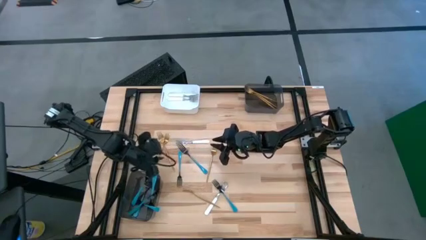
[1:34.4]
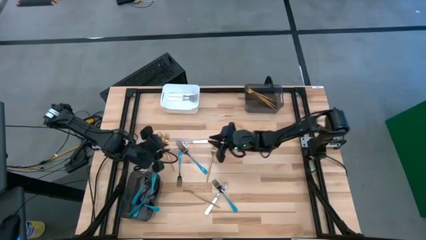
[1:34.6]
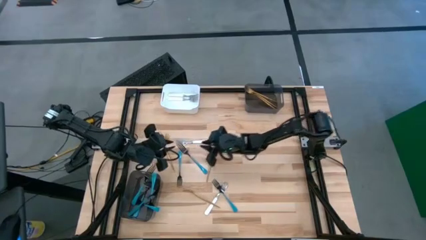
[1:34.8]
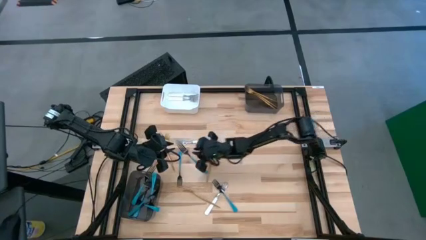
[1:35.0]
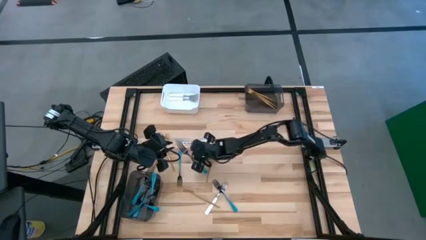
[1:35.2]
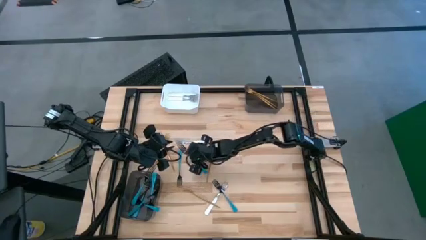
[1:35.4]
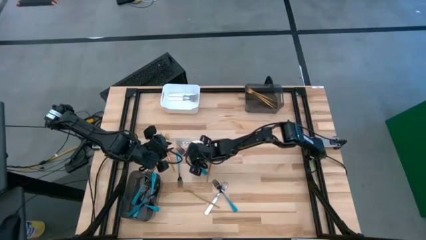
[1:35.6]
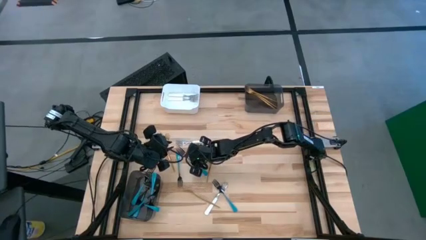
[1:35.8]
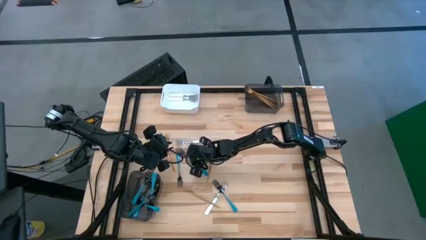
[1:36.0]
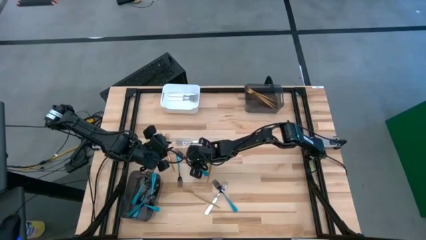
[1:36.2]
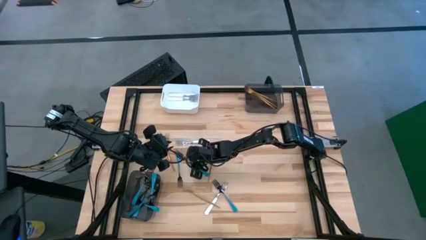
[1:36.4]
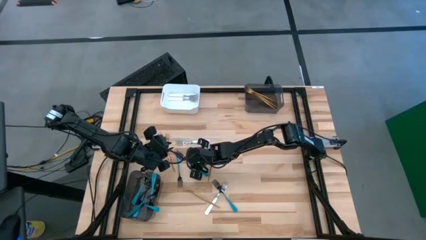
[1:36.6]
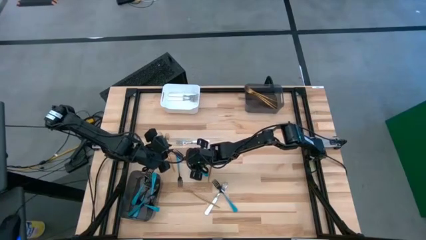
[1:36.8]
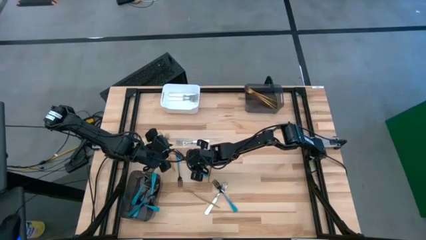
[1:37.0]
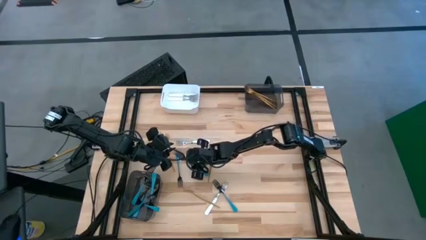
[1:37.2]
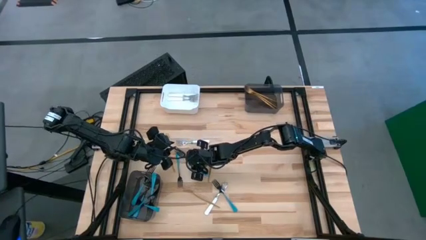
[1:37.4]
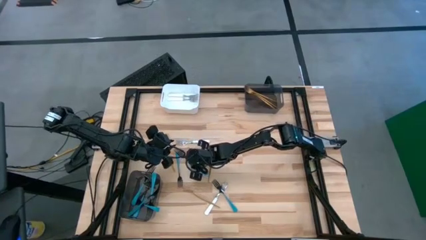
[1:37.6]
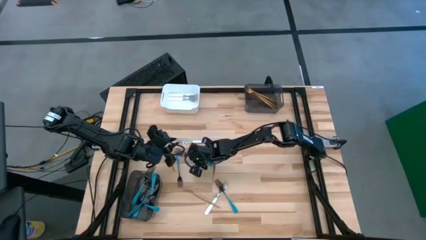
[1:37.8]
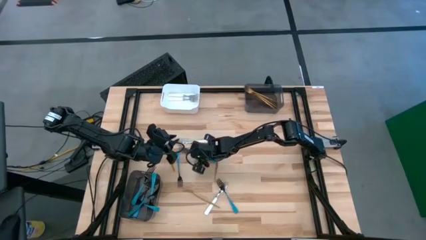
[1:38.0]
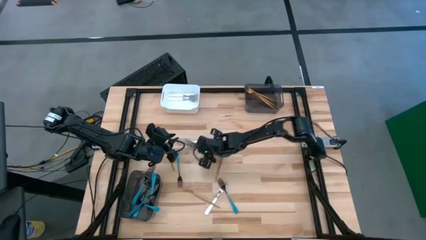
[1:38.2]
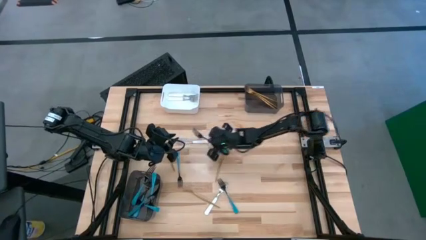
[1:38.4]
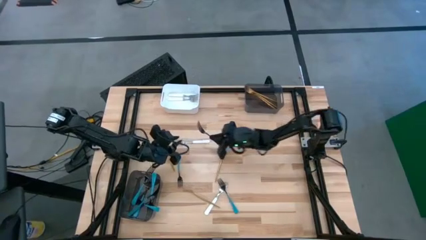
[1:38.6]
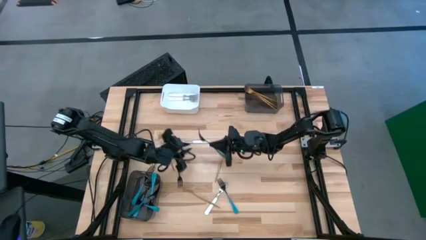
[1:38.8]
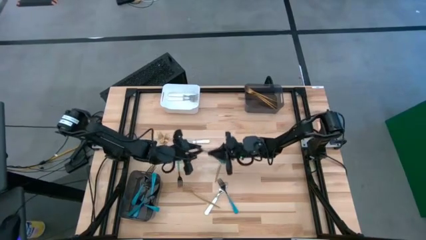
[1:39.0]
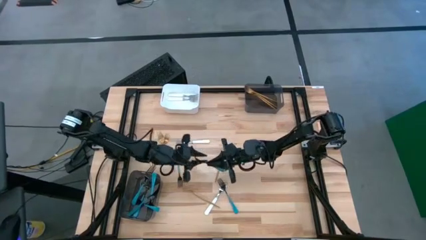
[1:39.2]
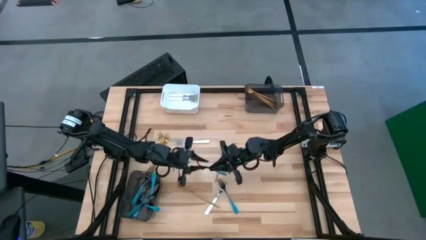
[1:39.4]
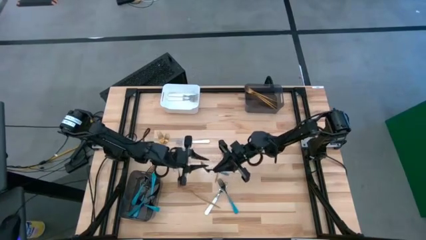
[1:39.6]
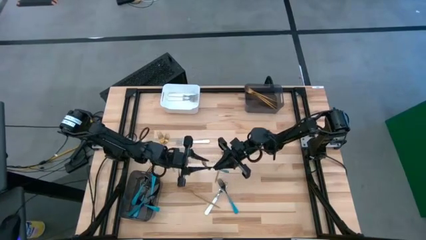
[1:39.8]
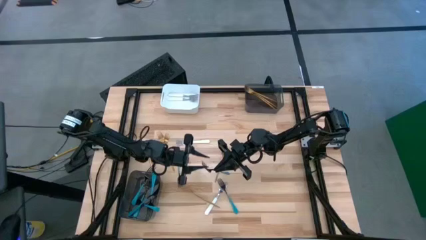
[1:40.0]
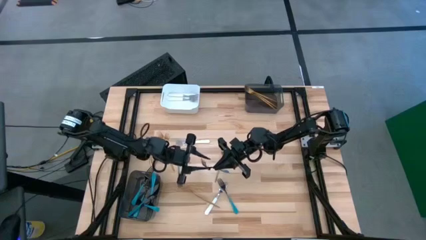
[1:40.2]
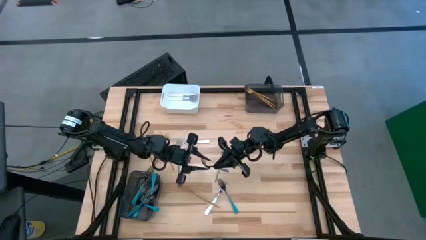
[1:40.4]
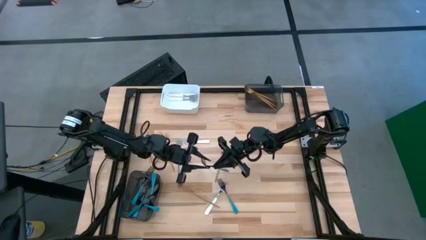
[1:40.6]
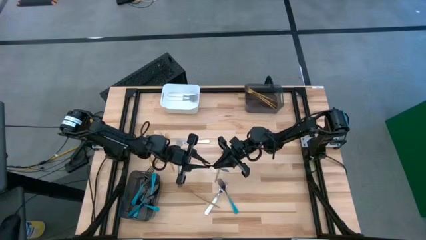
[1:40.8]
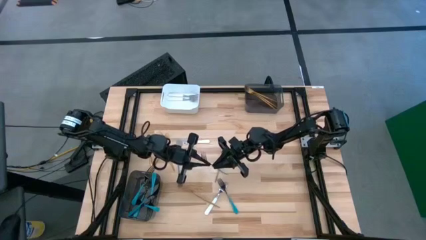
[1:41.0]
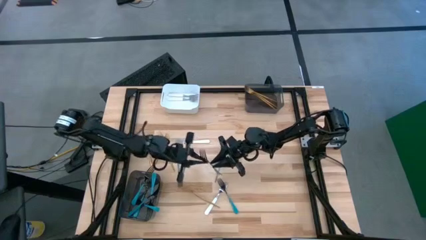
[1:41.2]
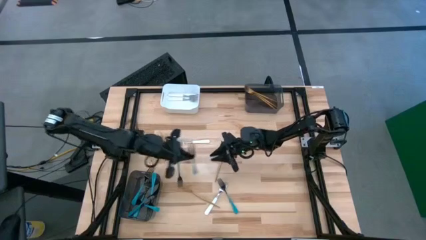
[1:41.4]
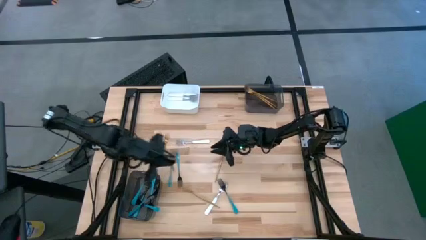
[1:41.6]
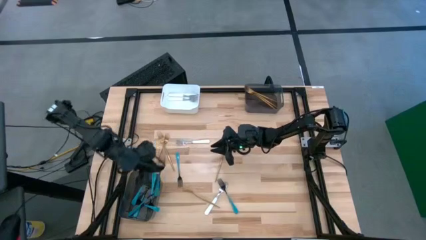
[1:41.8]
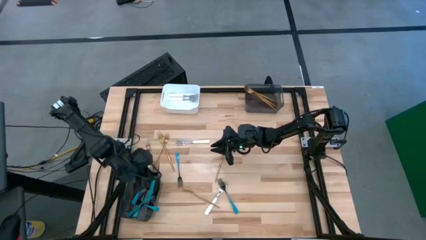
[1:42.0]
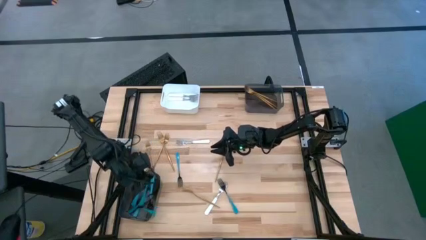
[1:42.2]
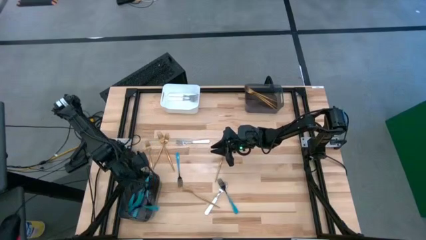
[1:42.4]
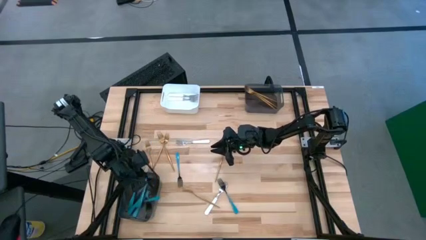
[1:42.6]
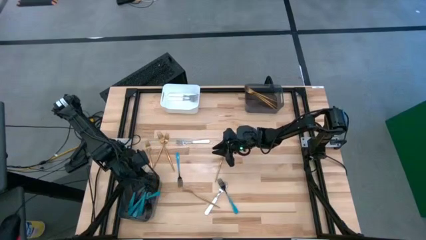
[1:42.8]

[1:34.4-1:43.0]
Task: Sort silverware by color (type)
Put the blue fork into the bottom black bin

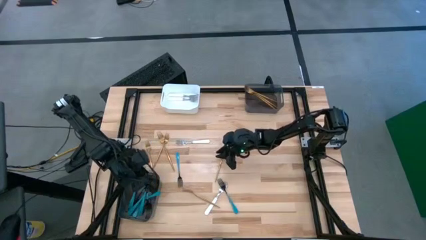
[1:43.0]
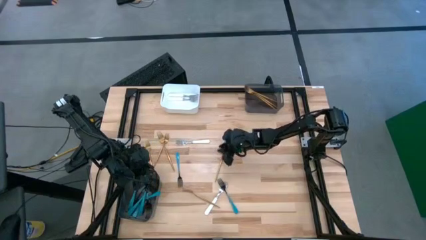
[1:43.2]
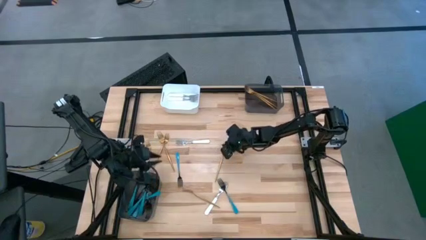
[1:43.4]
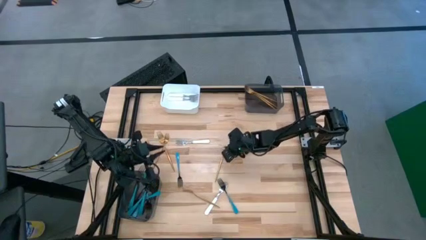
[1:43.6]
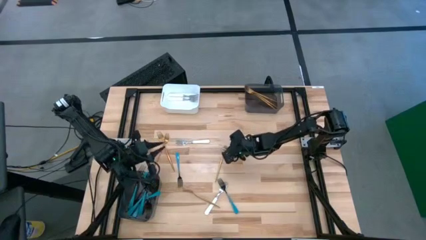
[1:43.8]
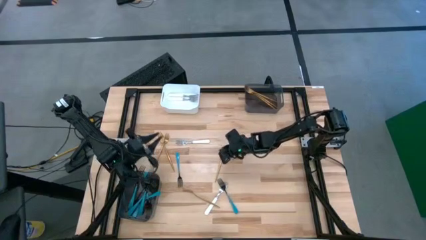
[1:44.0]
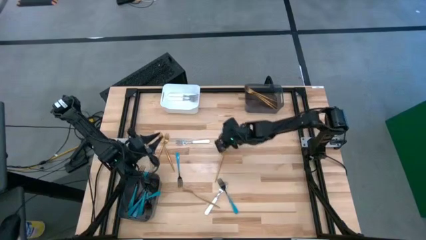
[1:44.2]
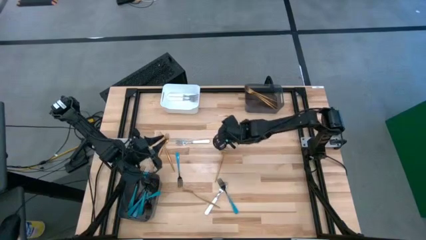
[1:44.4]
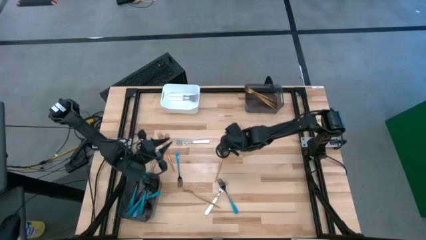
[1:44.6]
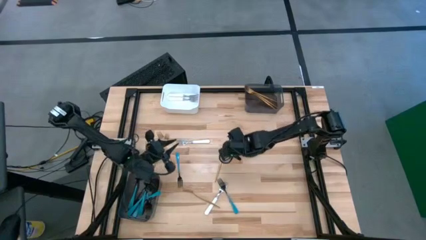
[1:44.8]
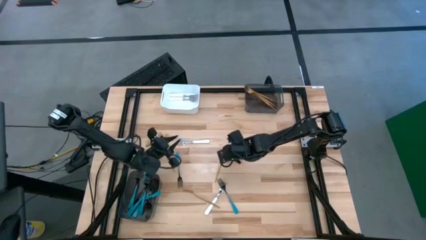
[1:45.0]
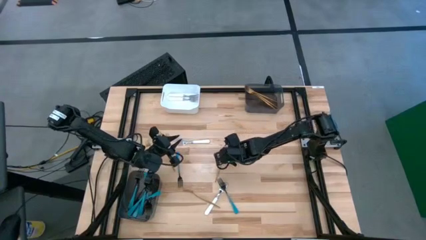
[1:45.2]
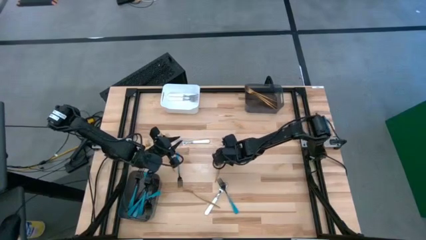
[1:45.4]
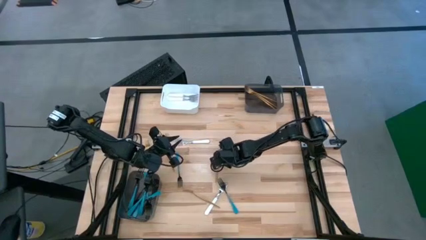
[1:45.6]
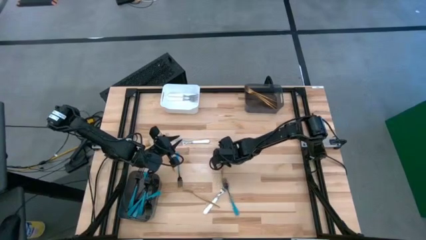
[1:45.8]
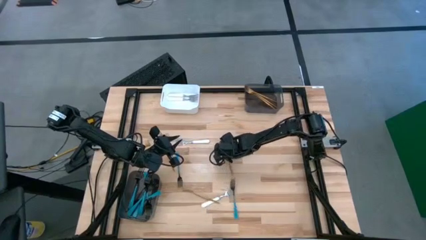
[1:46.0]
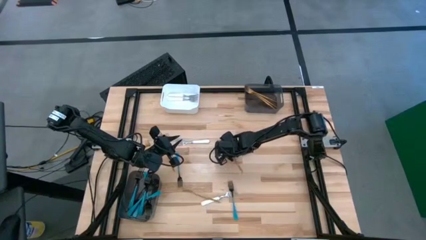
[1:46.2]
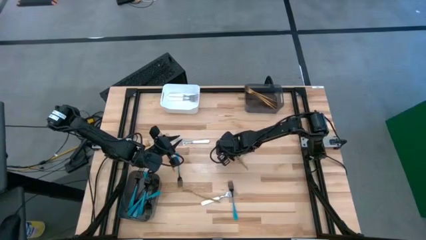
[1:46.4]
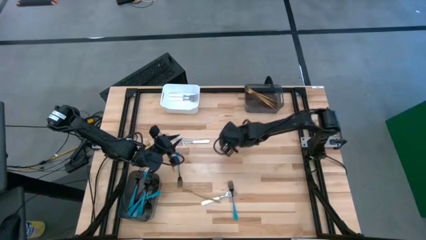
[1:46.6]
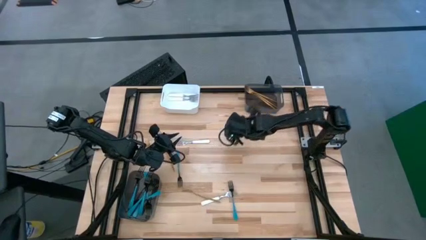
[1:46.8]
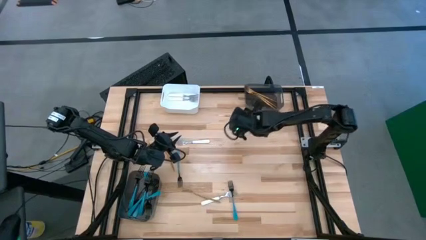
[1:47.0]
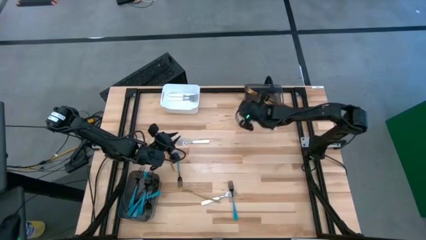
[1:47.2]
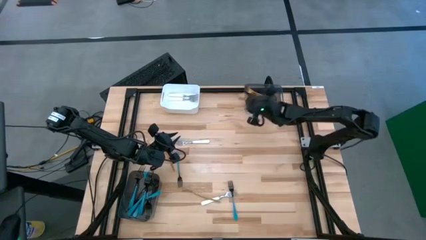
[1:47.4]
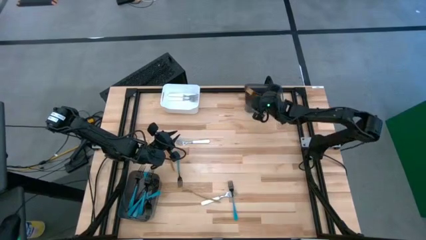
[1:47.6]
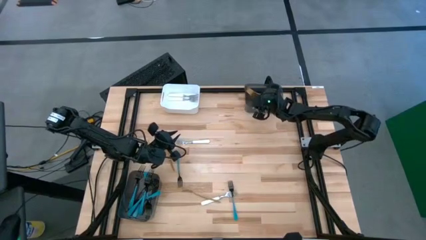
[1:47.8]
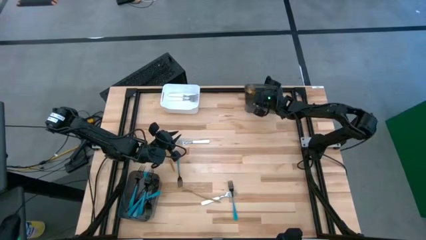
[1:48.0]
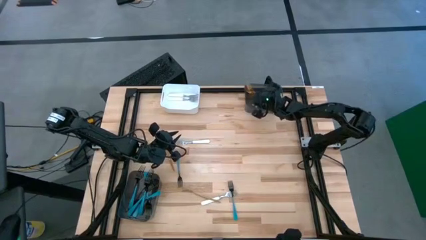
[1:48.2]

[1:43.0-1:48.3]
Put the gold fork into the top black bin

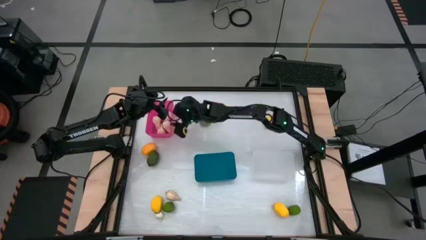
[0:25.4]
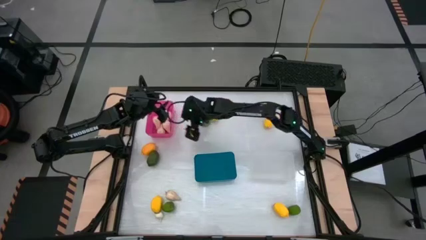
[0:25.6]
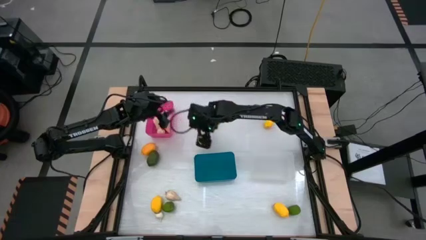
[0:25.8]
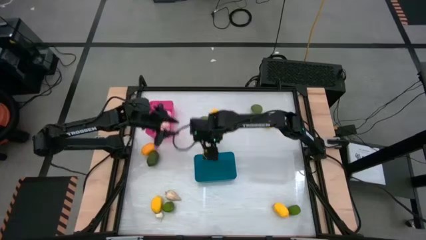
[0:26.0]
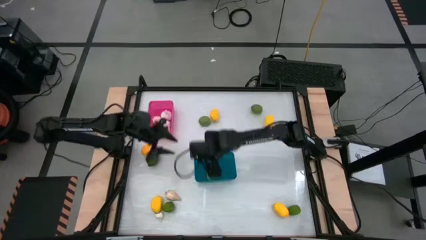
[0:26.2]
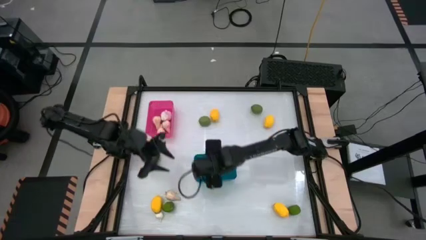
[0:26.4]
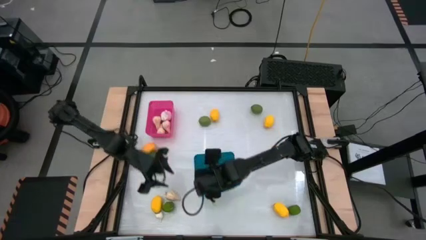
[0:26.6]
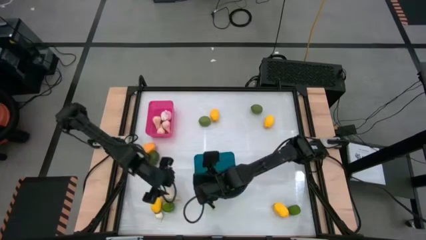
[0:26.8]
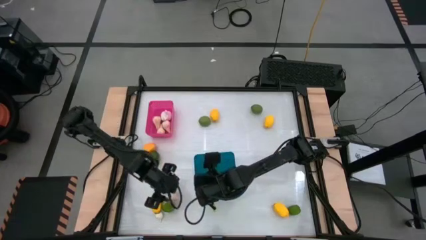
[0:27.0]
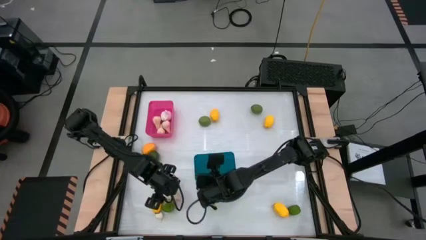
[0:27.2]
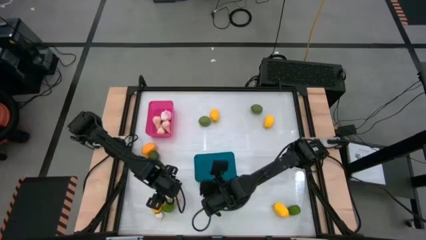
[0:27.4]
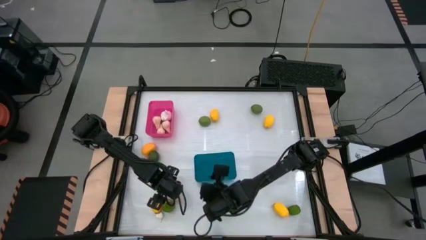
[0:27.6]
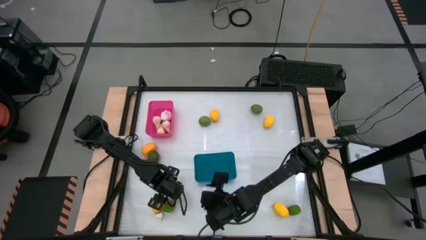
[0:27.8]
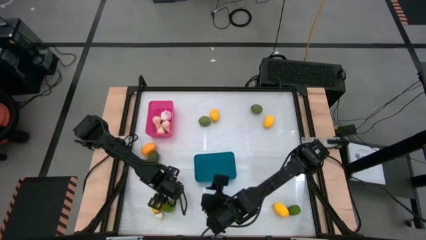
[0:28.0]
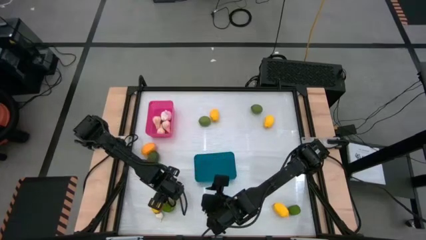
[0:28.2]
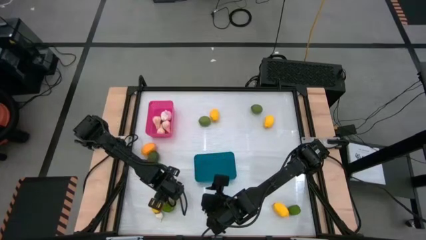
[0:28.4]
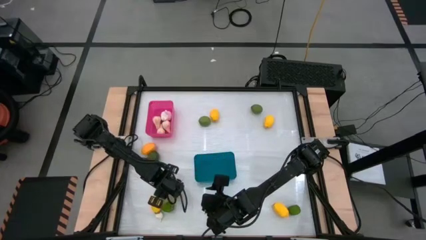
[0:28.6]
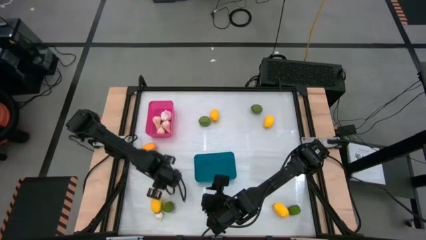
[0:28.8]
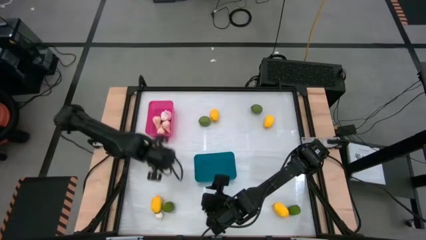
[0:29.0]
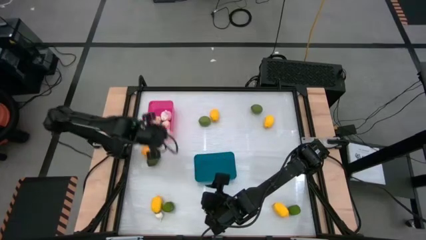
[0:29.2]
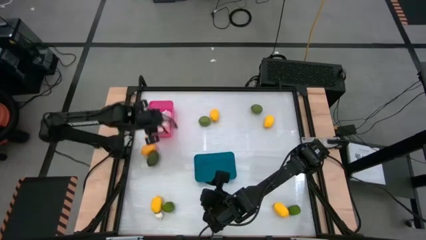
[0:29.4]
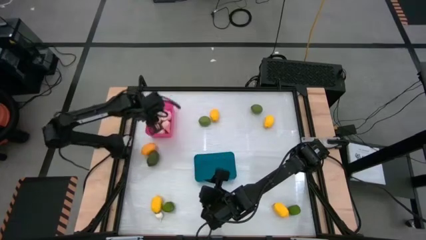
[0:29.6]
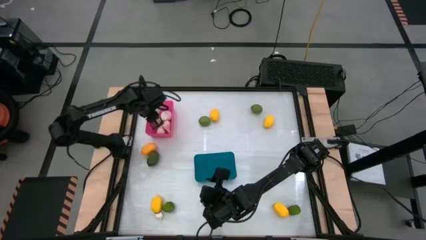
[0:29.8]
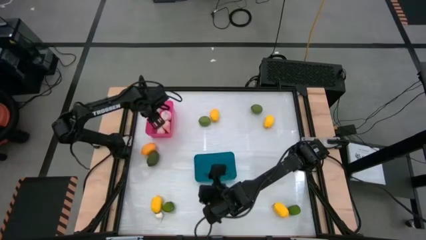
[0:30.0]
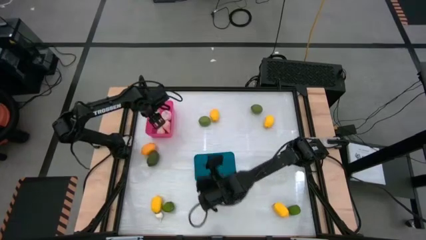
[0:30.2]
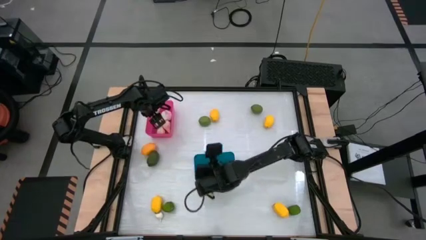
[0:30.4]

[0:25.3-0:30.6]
Task: Sort produce into baskets
Put the garlic into the pink bin
